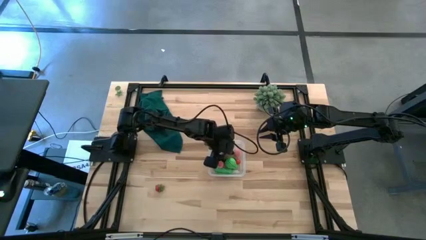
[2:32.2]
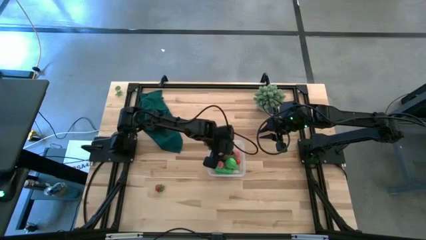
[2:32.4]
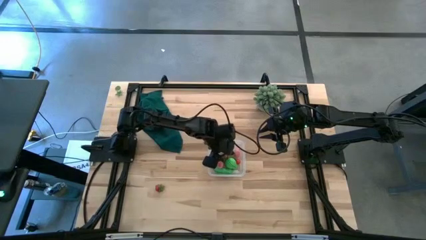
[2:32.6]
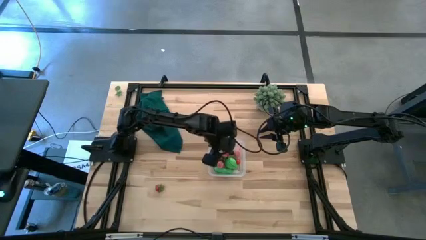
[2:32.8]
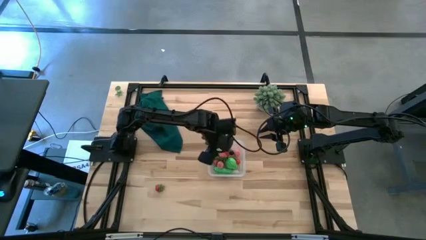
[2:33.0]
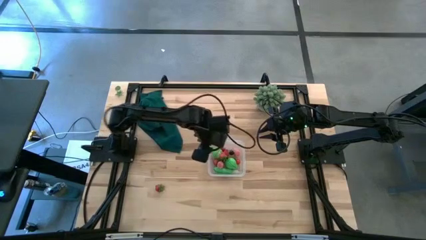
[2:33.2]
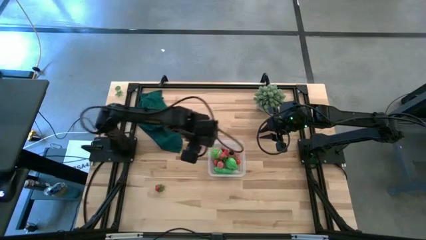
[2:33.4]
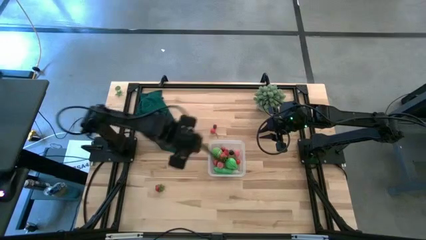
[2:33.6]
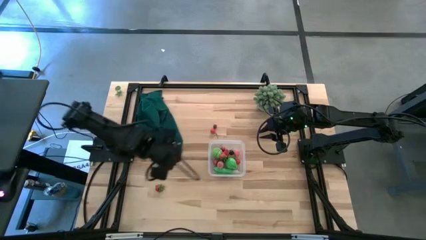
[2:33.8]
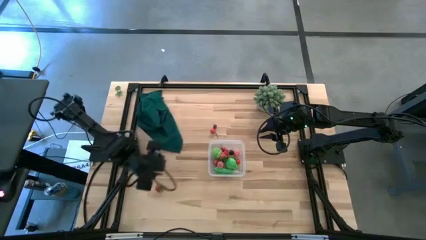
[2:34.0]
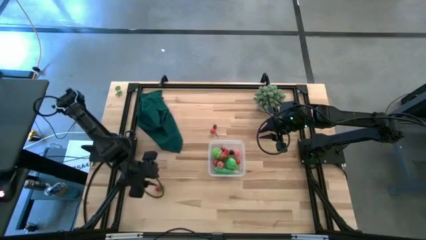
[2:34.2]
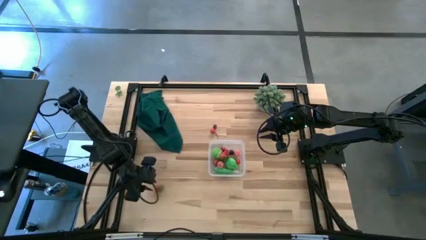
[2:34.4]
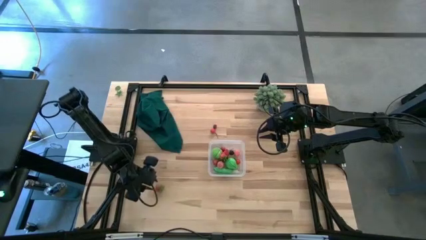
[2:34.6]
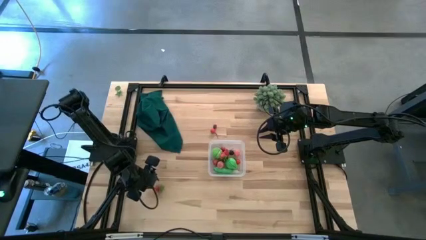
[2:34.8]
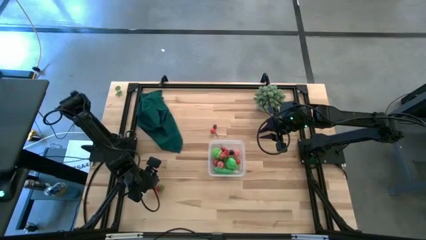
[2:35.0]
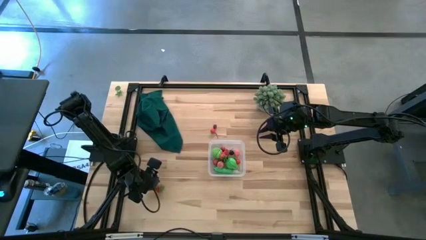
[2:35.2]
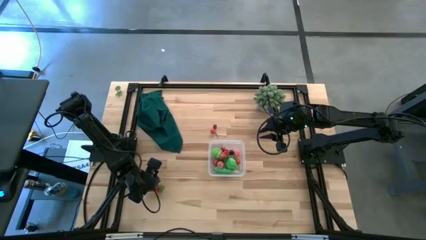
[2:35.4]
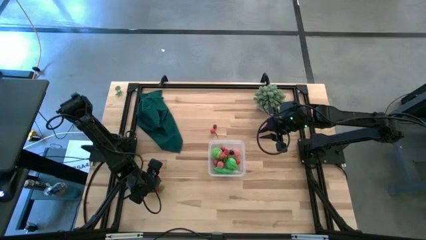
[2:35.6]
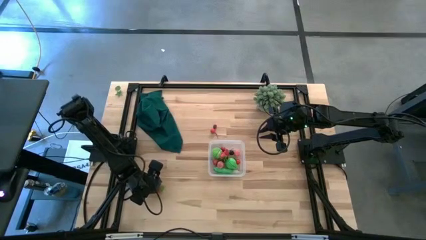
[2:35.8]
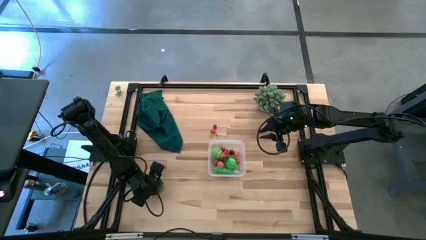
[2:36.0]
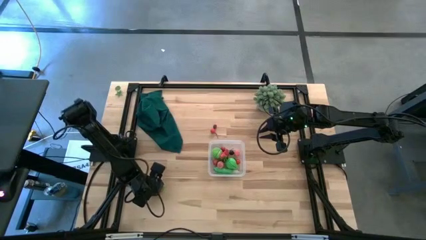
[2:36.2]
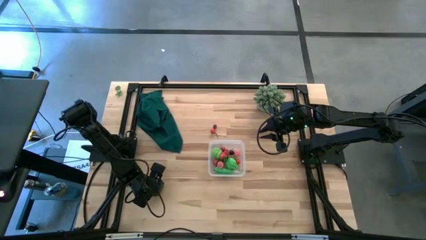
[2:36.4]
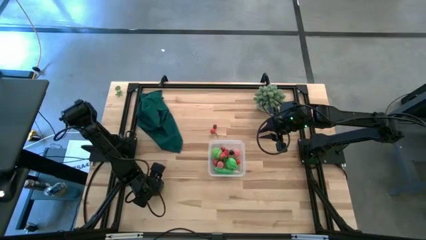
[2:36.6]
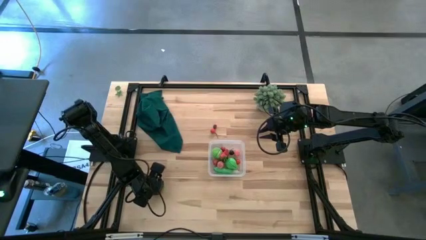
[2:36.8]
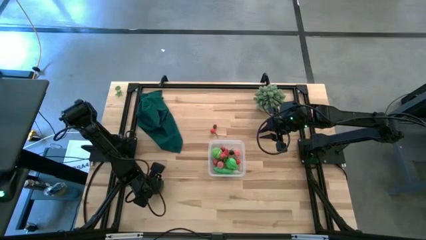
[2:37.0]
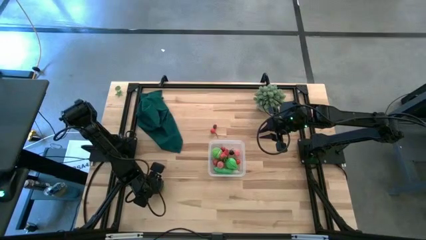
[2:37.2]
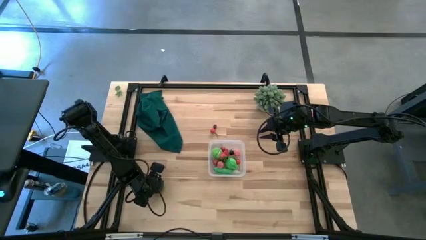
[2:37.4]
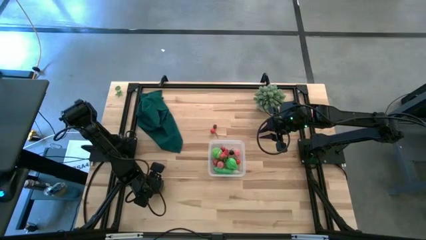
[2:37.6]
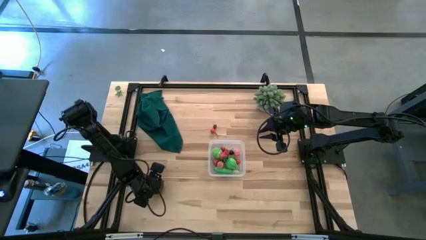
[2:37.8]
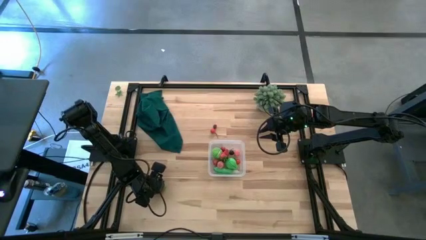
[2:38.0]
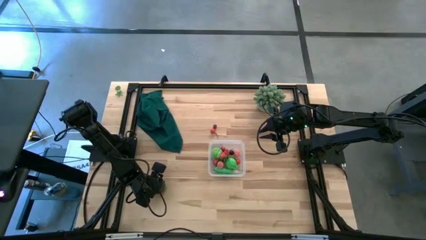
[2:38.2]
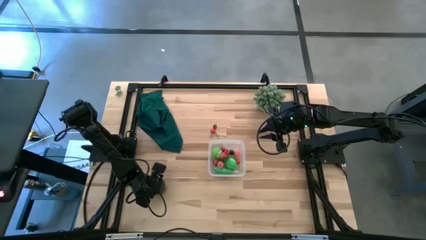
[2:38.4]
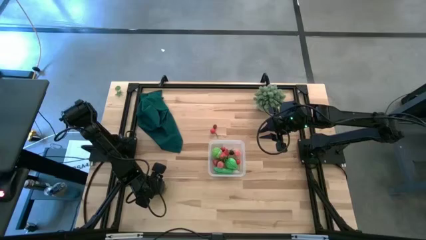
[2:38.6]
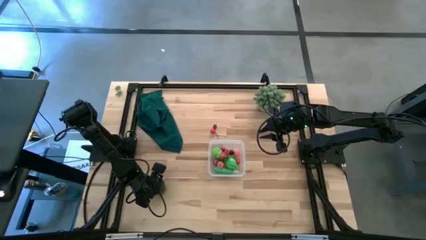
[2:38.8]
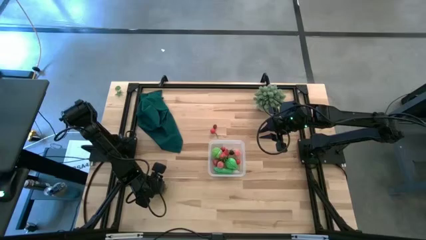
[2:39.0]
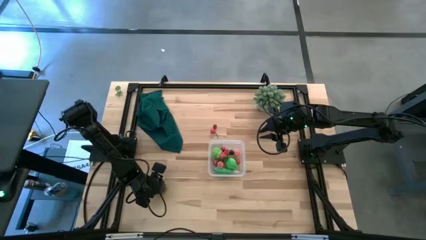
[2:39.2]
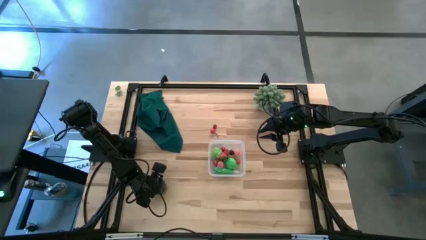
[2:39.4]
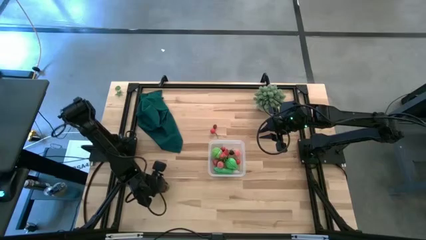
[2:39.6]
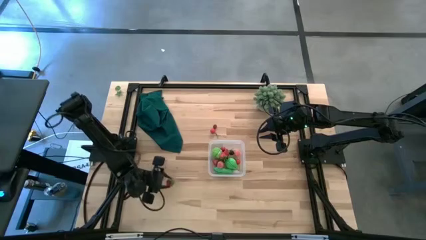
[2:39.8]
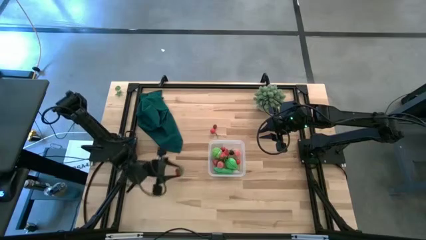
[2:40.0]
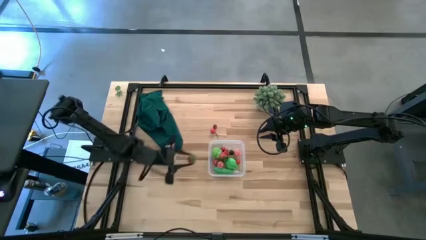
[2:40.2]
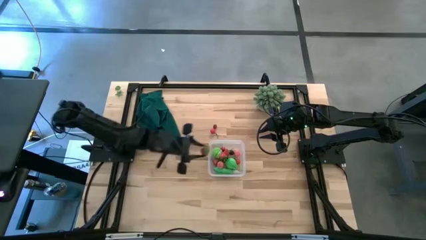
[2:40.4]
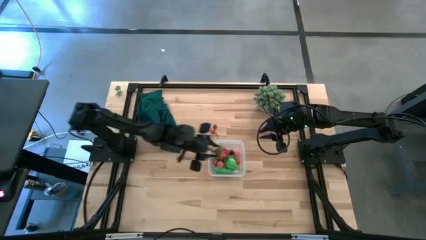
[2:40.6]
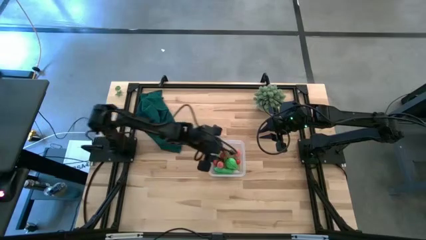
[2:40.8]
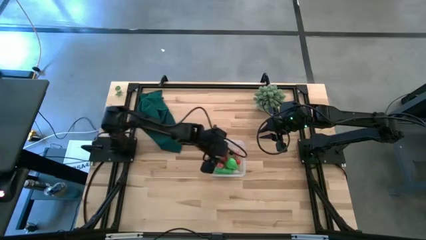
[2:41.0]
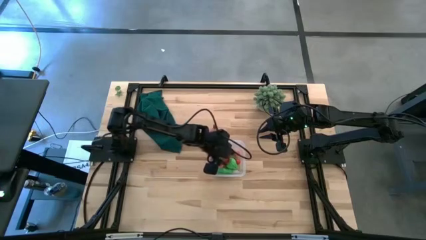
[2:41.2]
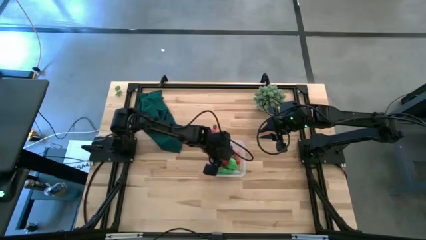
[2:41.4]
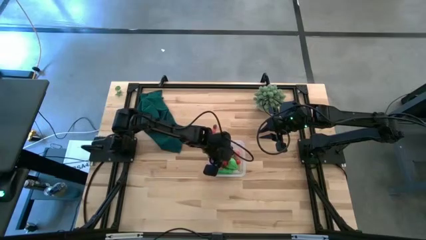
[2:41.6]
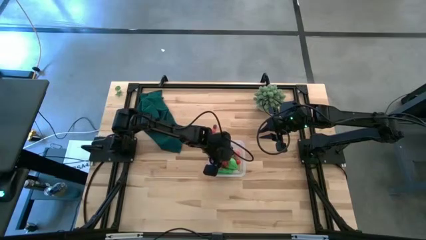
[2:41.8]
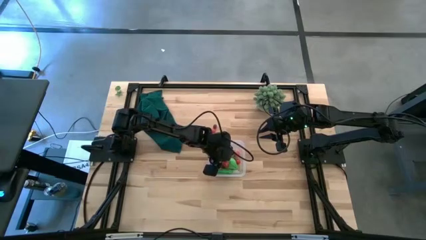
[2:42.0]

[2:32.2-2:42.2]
Task: Pick and placing Produce into tupperware
Put the red strawberry into the container

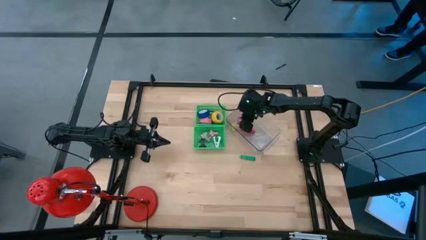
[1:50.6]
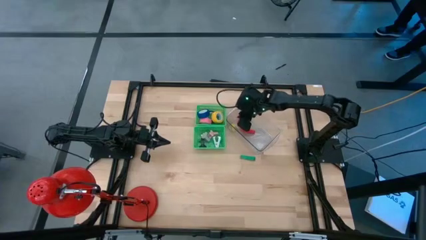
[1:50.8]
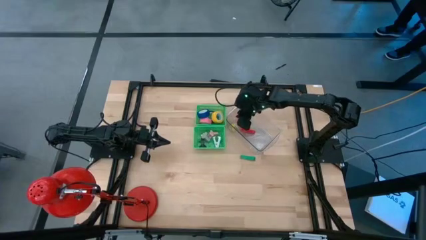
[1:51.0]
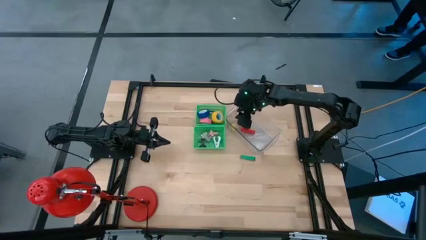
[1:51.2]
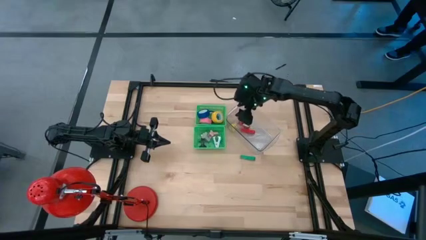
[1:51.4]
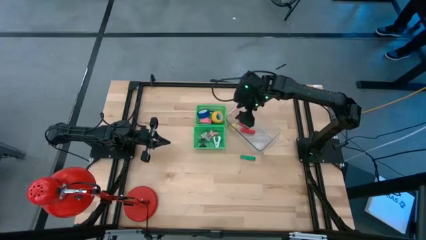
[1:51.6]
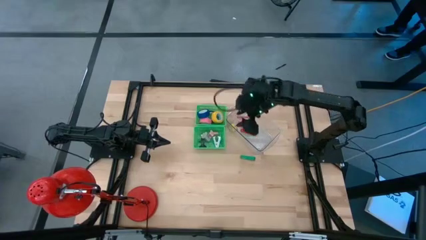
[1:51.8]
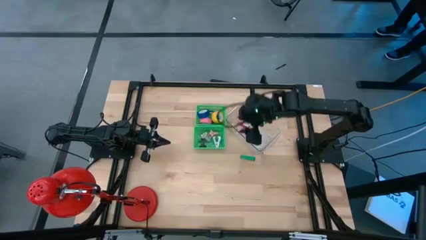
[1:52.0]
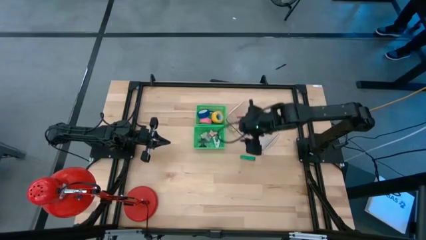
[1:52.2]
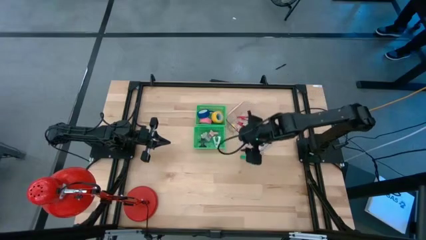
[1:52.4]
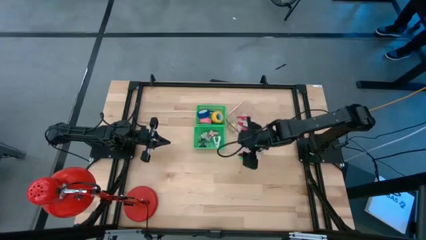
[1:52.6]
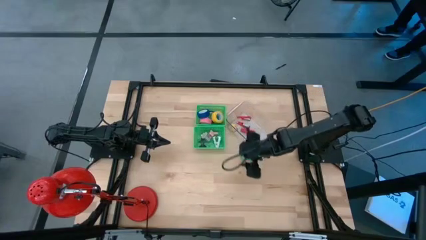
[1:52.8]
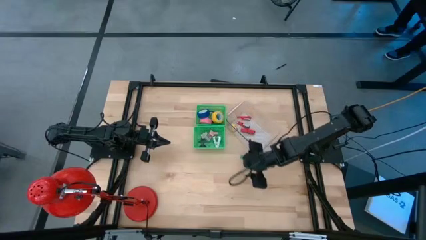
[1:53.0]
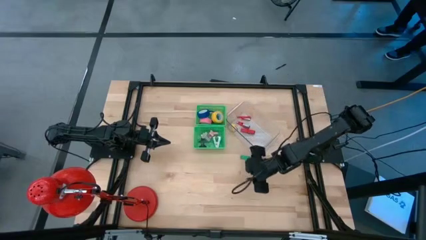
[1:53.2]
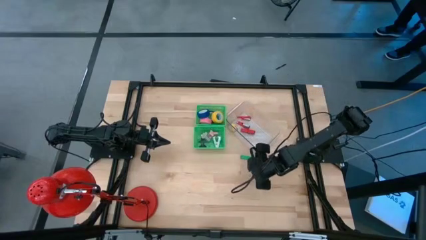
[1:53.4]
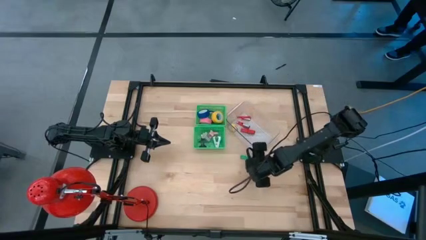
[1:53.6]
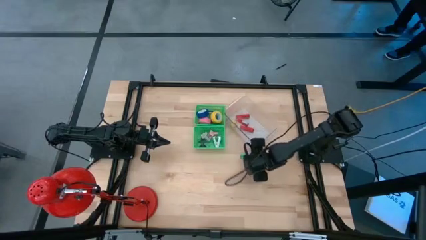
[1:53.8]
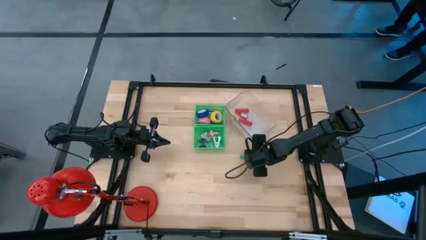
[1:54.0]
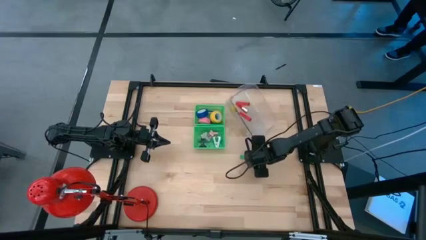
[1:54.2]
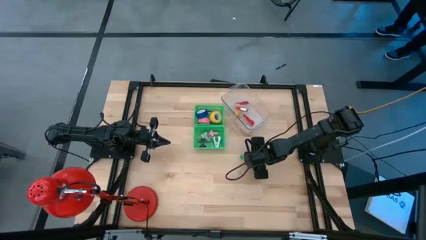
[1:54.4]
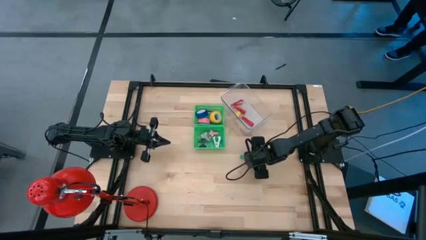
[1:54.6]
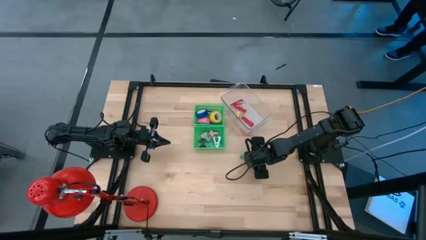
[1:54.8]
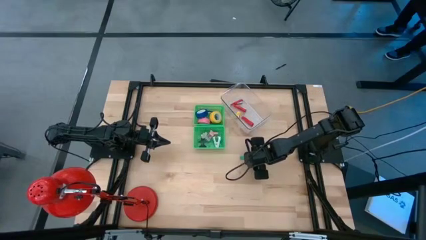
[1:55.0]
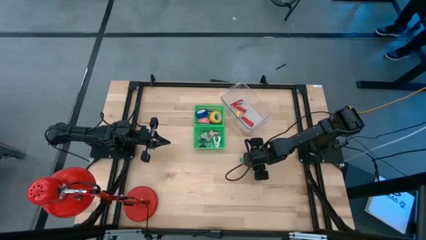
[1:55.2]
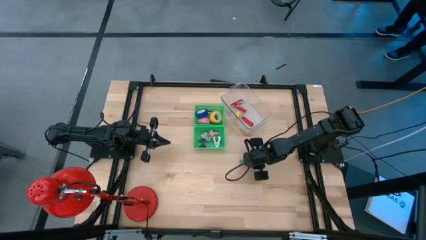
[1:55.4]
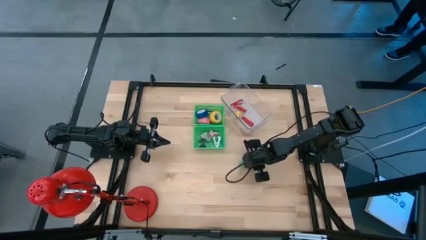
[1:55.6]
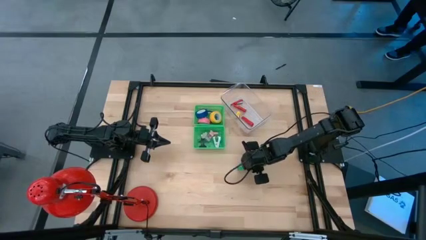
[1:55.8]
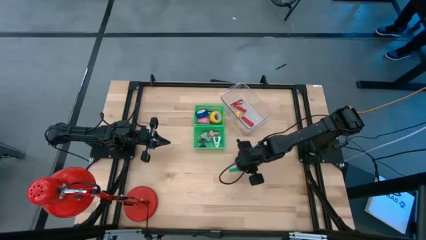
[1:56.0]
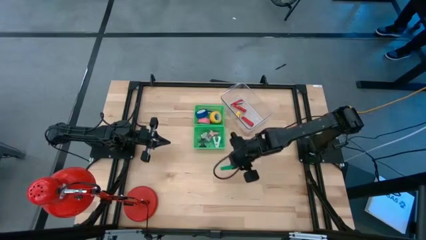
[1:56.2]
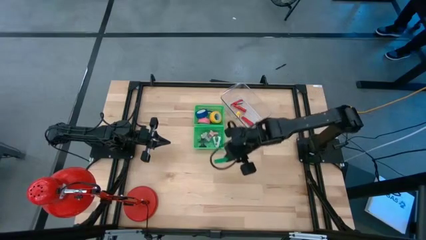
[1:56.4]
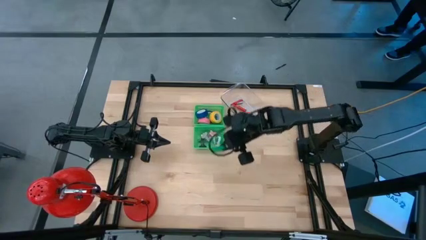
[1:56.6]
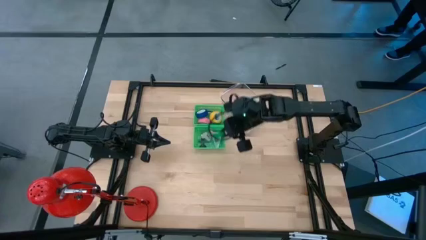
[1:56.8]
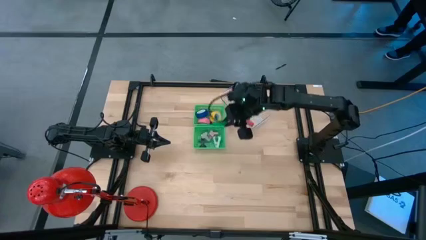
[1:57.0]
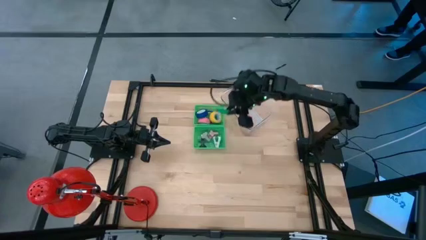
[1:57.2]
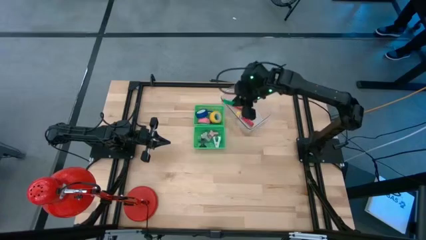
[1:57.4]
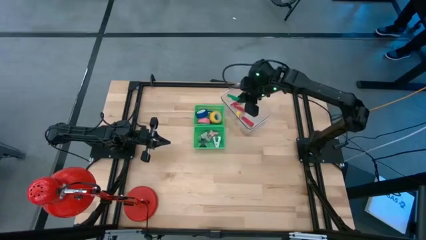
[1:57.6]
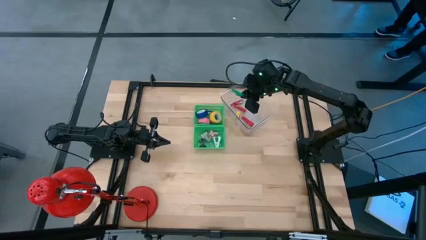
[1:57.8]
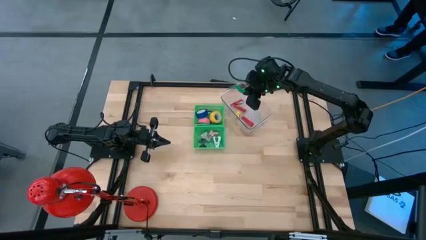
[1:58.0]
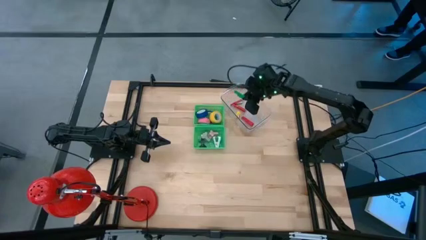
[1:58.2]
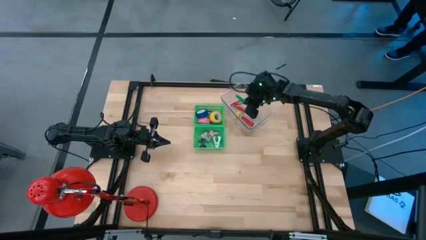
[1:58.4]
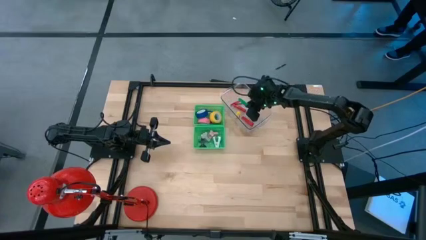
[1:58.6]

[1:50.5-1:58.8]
Task: Pick and place Stapler, Stapler remover, tape
Put the green mini stapler into the transparent bin
